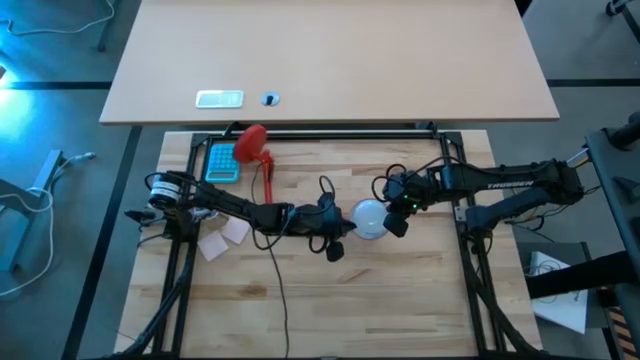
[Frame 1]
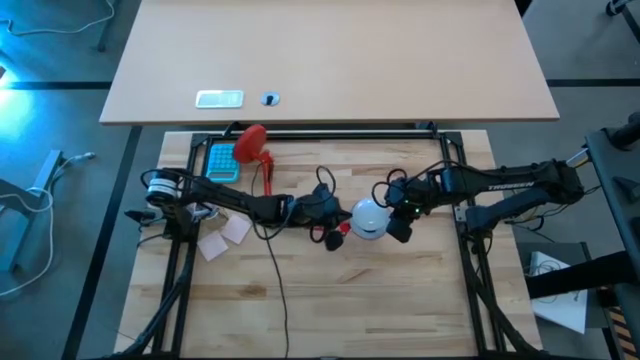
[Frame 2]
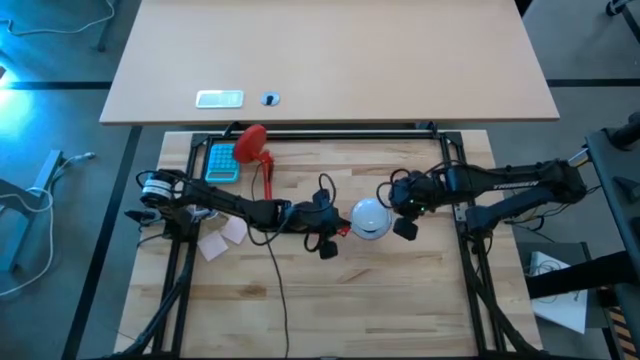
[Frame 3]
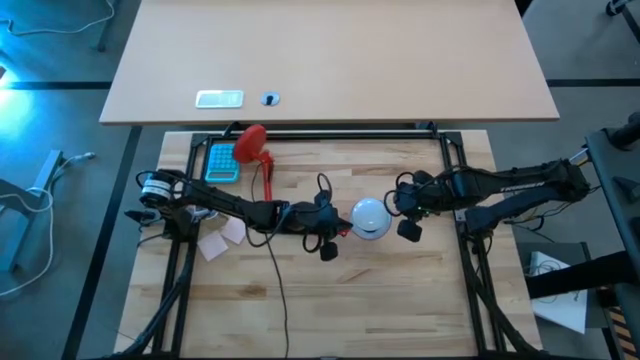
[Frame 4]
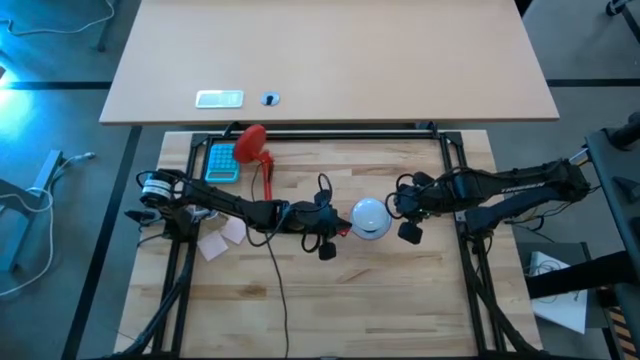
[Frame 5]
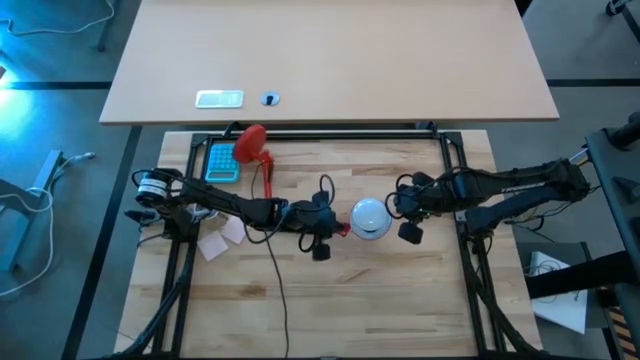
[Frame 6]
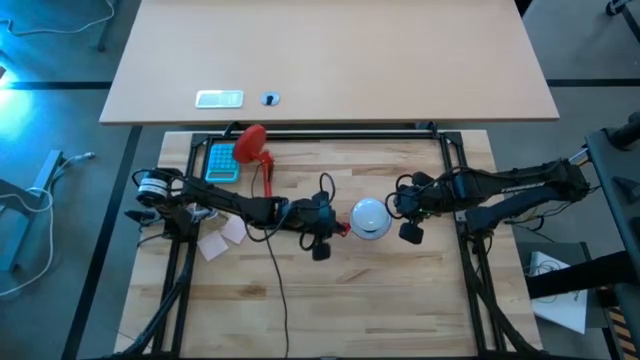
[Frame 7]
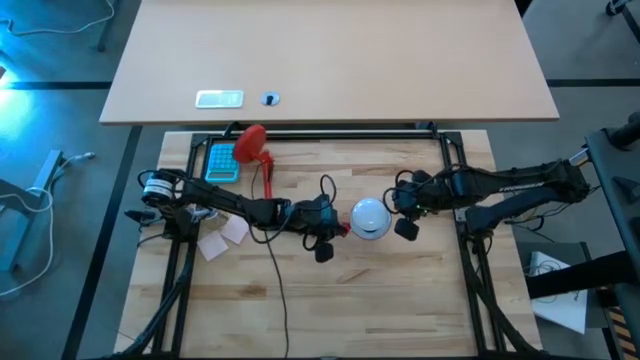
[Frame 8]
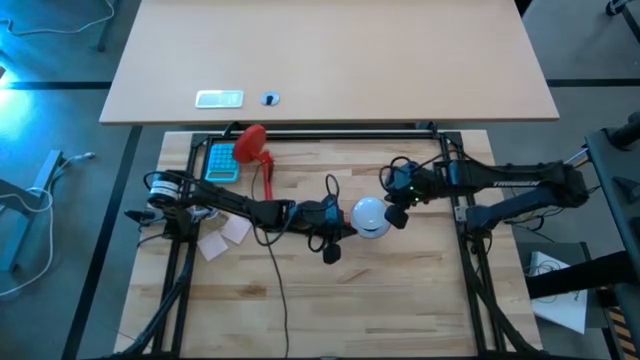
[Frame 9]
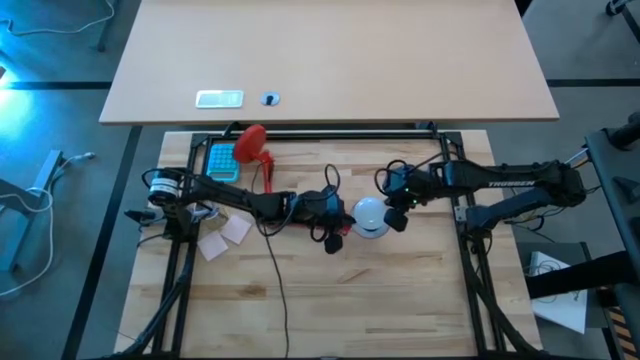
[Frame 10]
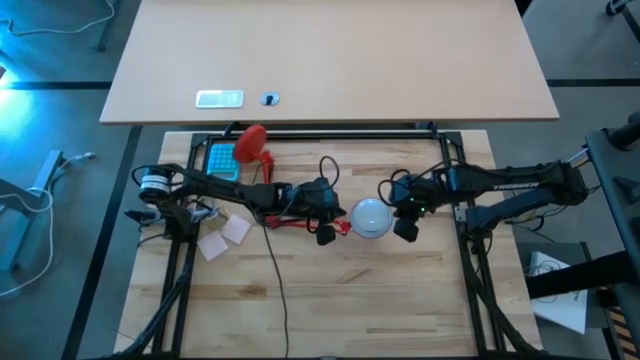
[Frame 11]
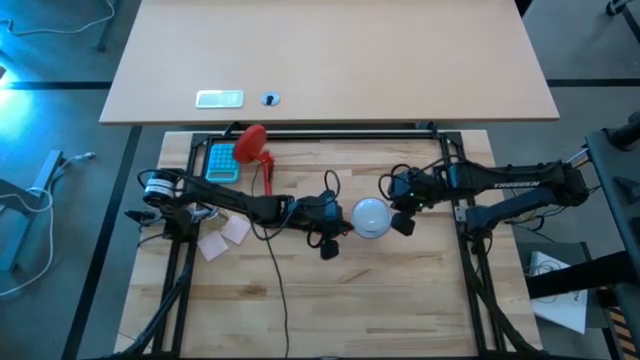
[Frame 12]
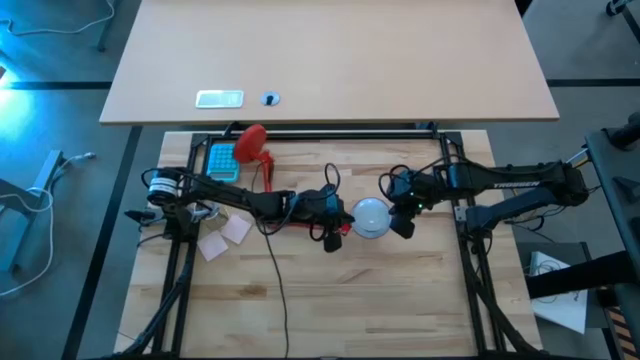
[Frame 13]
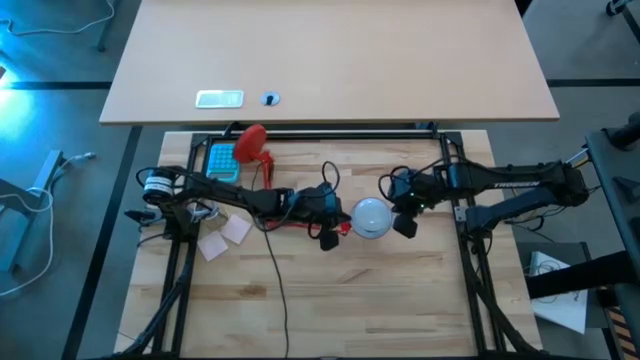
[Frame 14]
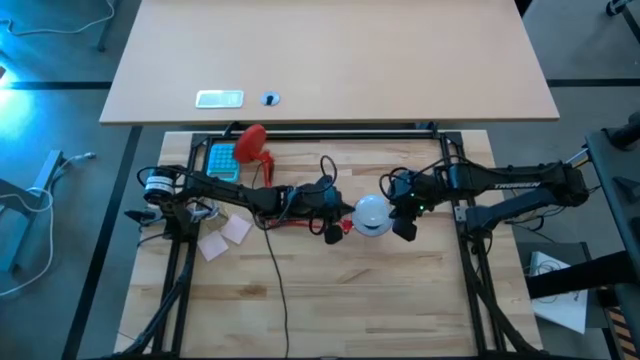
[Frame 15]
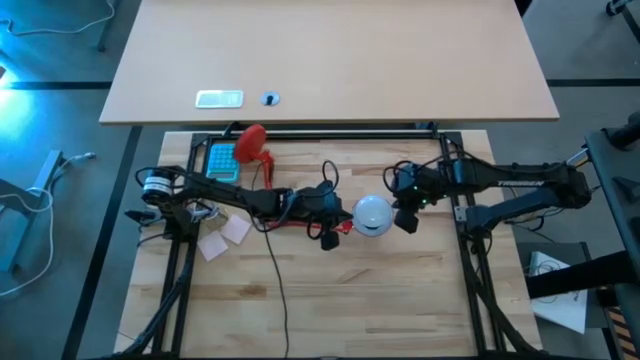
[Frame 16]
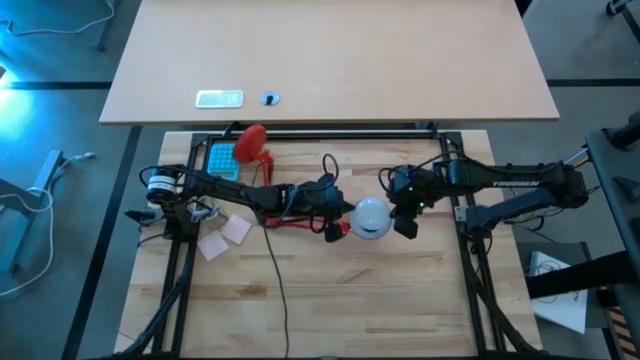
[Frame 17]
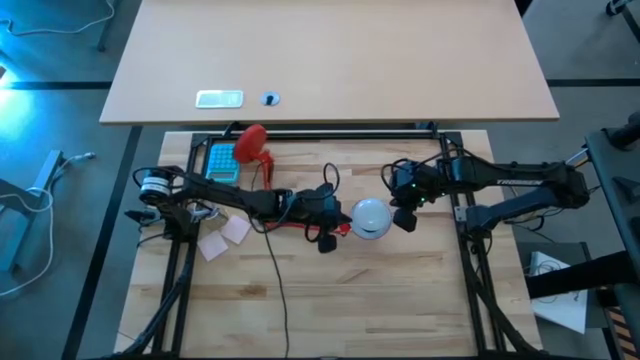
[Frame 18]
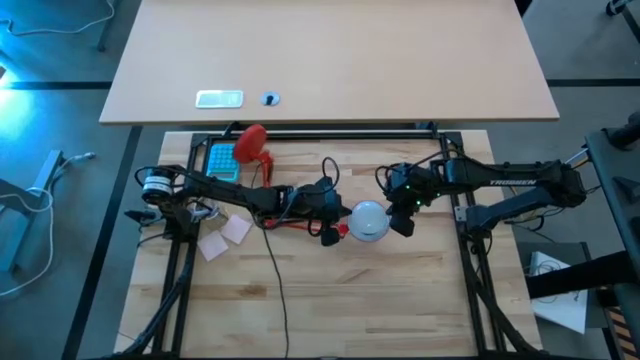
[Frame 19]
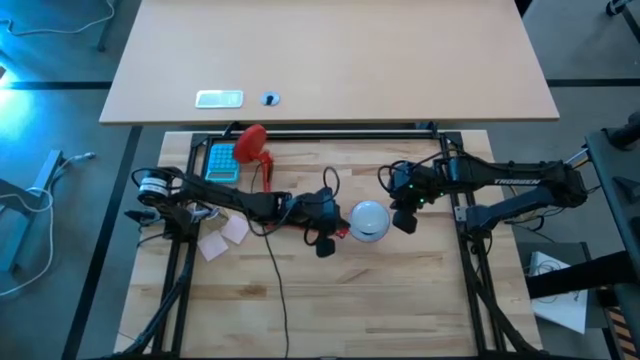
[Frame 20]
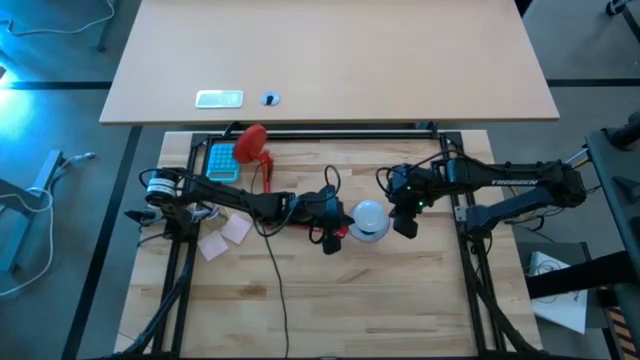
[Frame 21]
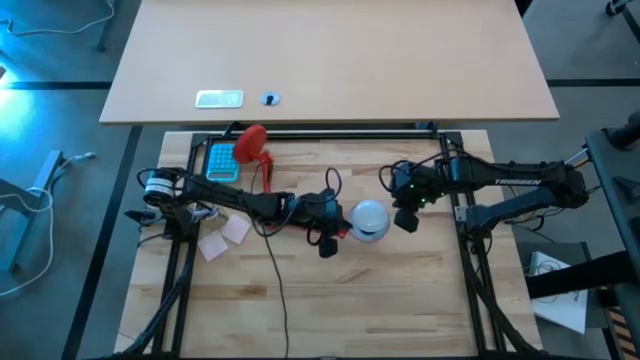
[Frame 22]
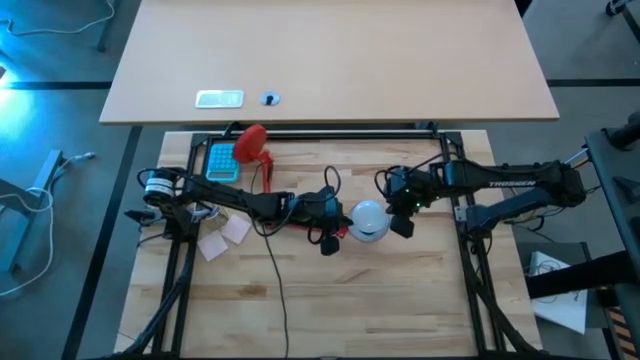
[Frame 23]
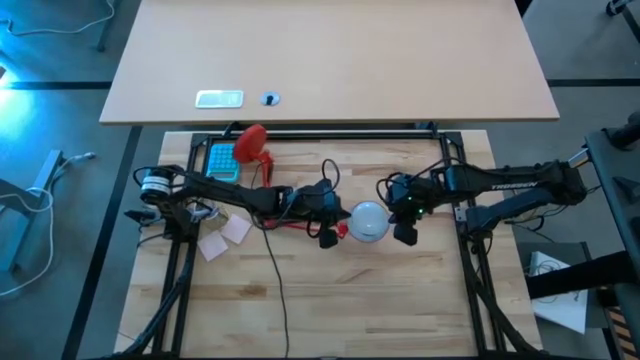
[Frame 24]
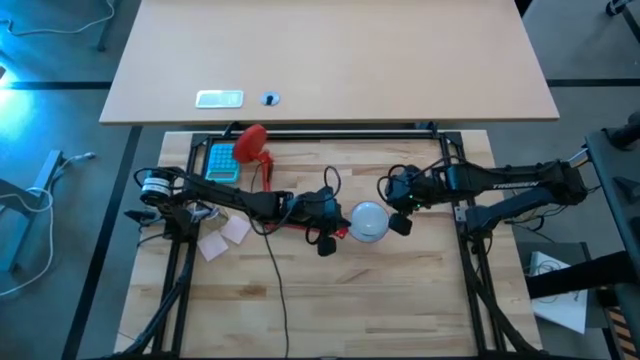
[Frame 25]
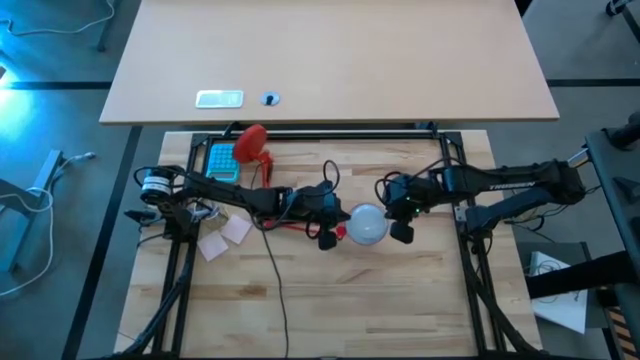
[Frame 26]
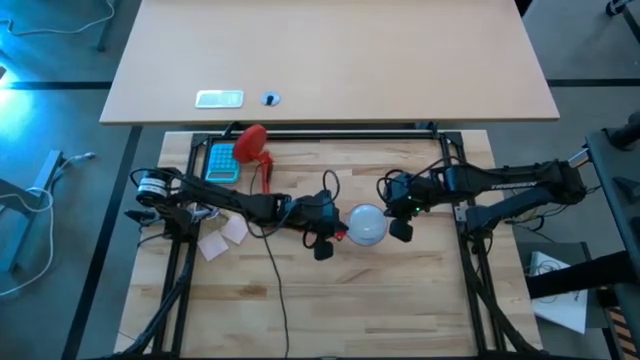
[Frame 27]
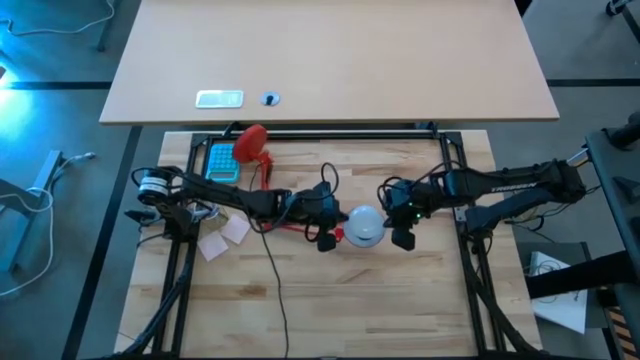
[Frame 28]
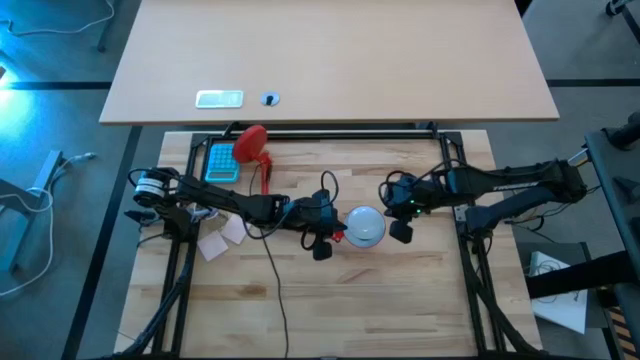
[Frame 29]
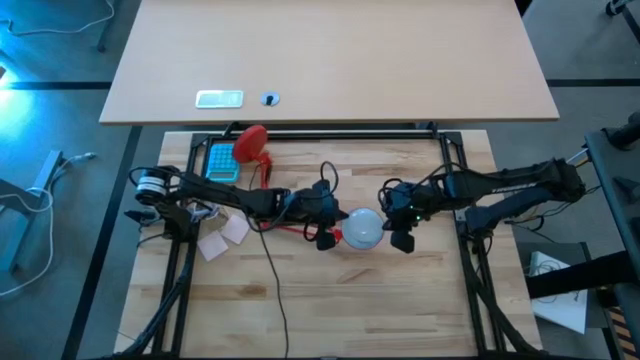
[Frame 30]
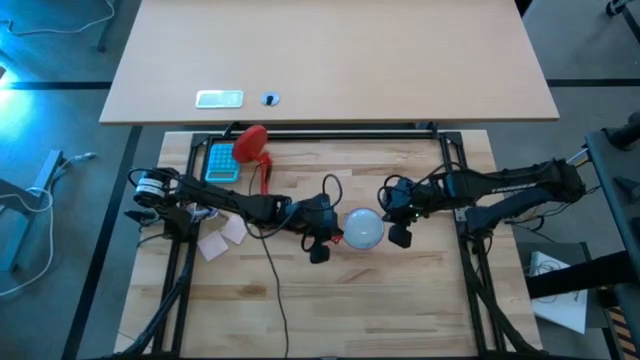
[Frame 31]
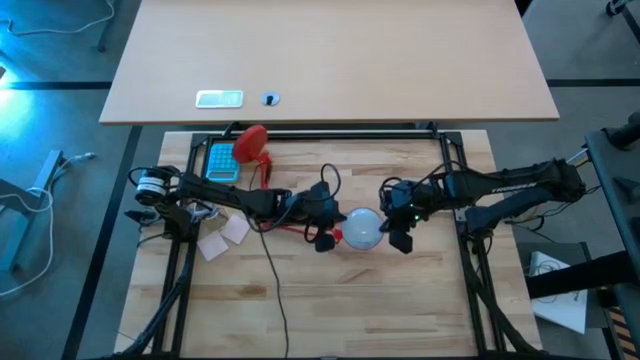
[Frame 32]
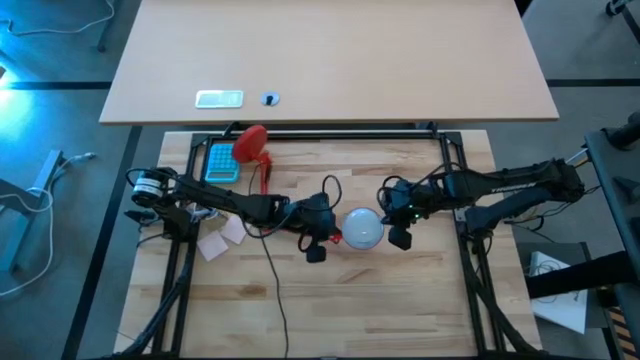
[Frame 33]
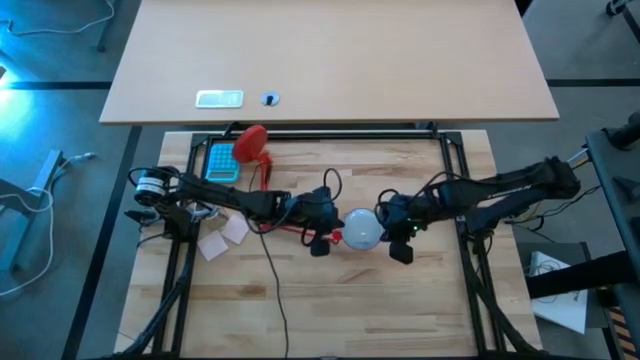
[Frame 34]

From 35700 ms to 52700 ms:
Task: Screw lightbulb
Insert the light bulb into the lamp
